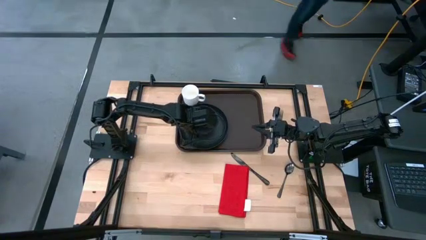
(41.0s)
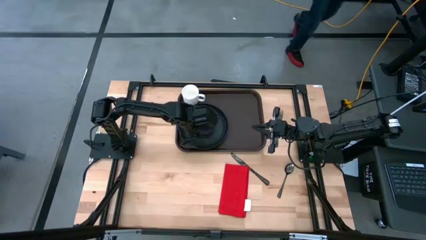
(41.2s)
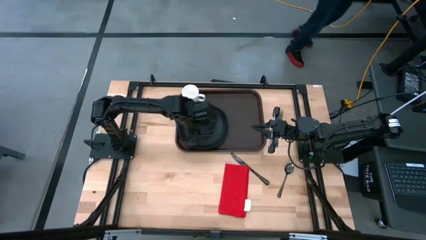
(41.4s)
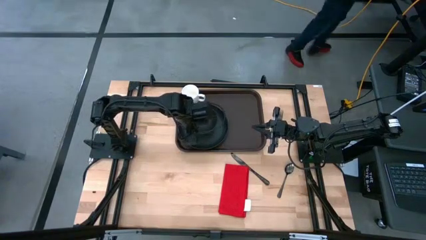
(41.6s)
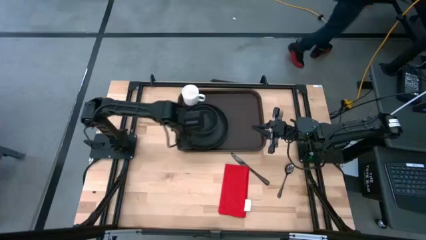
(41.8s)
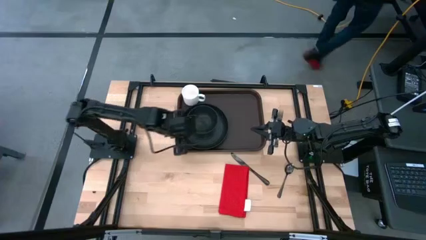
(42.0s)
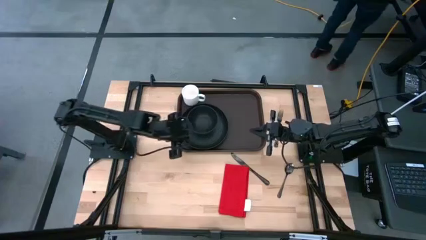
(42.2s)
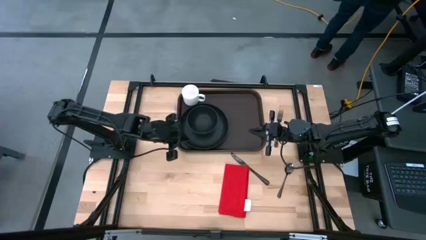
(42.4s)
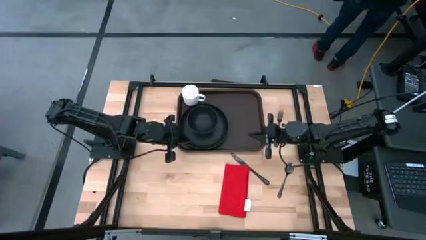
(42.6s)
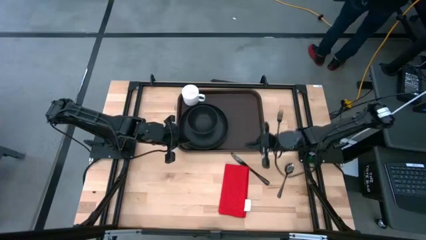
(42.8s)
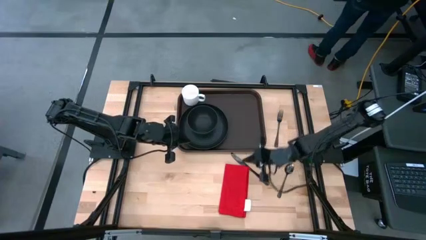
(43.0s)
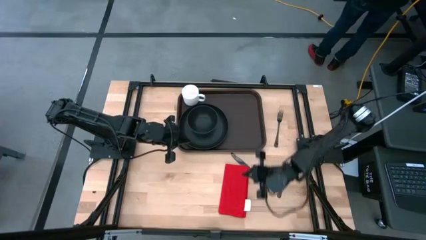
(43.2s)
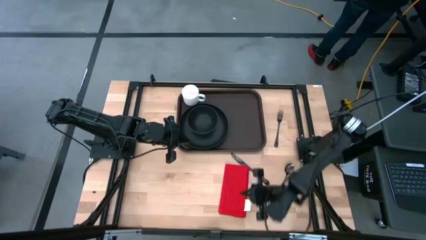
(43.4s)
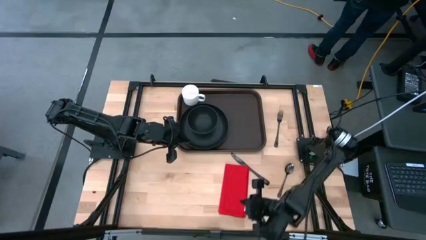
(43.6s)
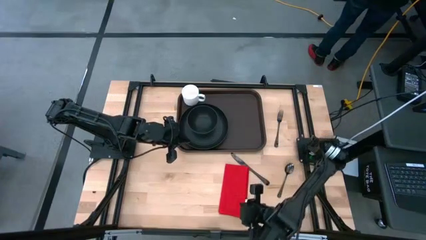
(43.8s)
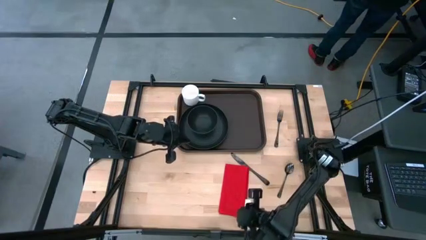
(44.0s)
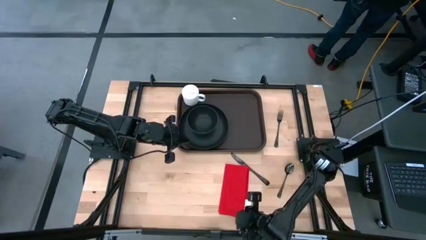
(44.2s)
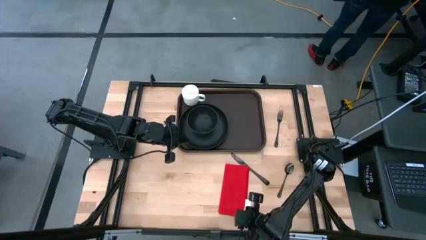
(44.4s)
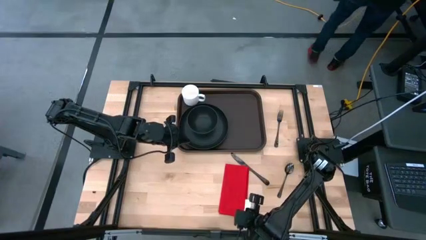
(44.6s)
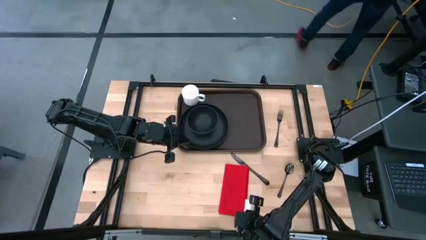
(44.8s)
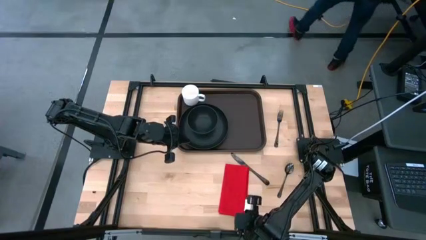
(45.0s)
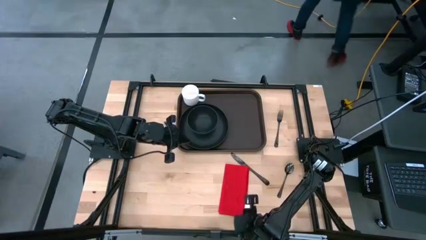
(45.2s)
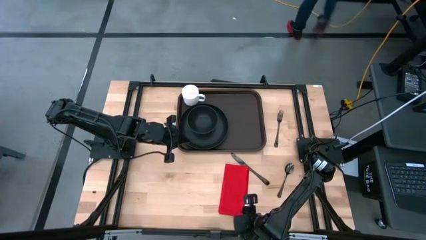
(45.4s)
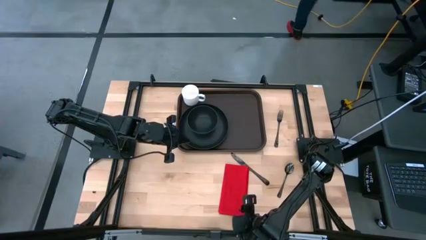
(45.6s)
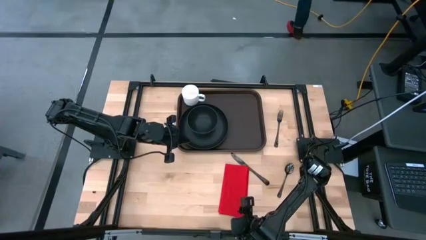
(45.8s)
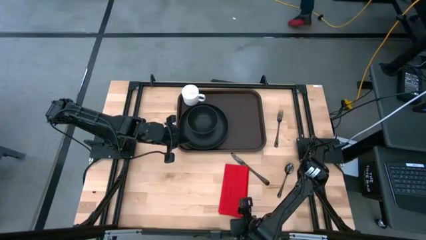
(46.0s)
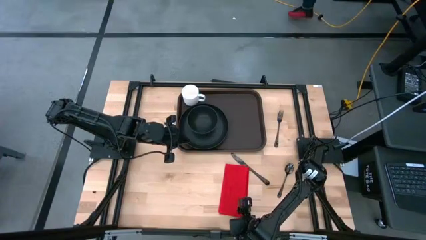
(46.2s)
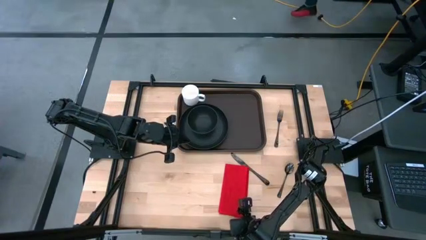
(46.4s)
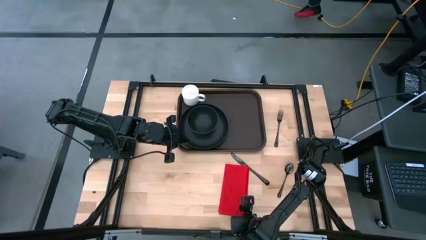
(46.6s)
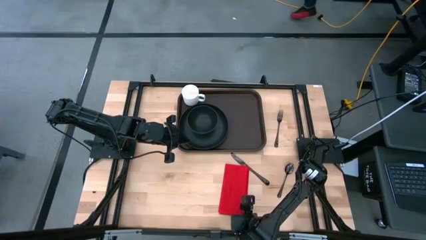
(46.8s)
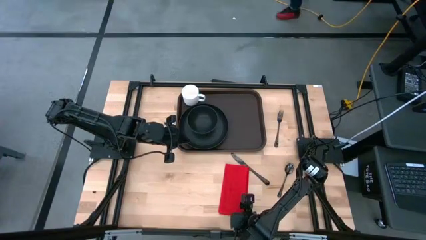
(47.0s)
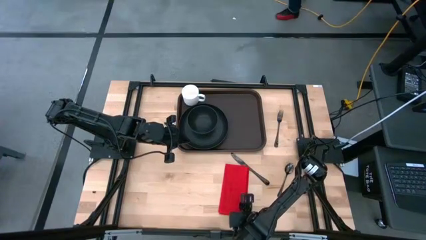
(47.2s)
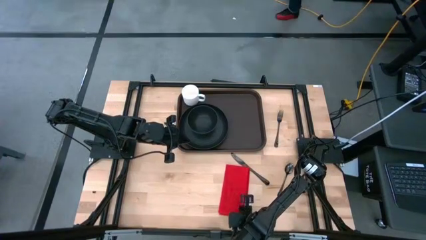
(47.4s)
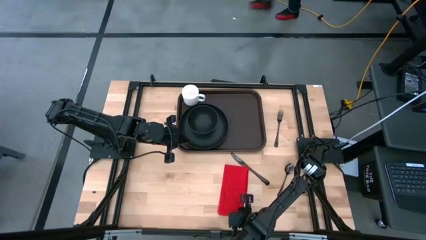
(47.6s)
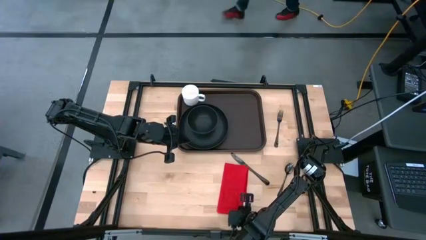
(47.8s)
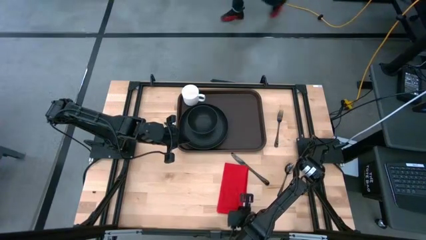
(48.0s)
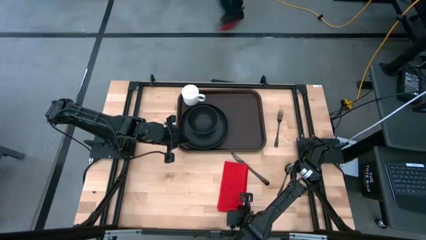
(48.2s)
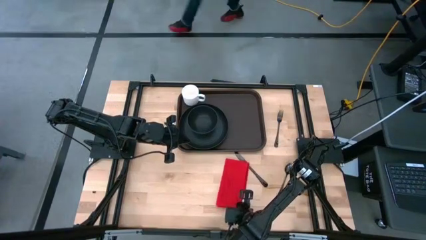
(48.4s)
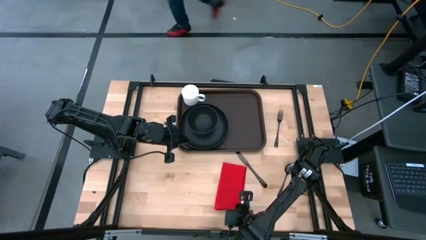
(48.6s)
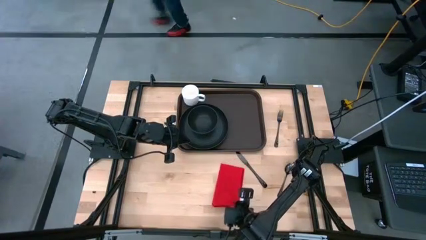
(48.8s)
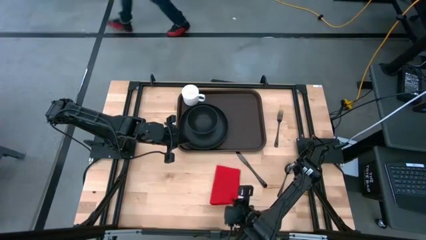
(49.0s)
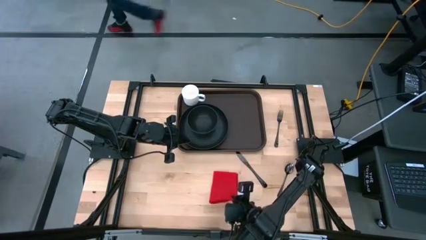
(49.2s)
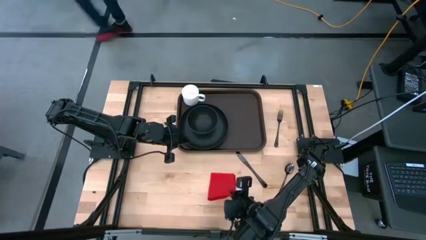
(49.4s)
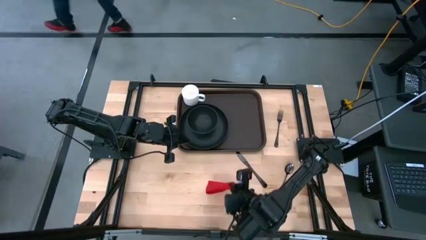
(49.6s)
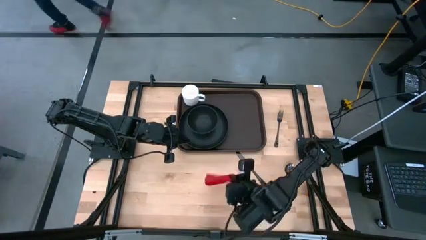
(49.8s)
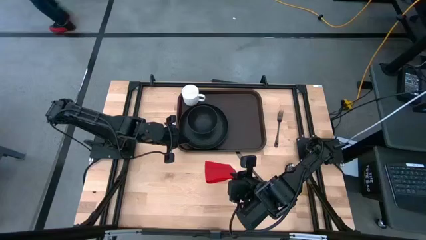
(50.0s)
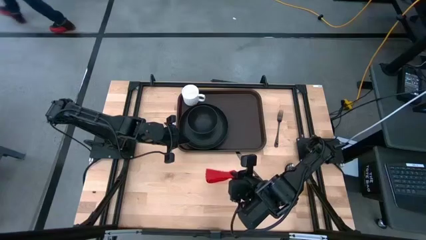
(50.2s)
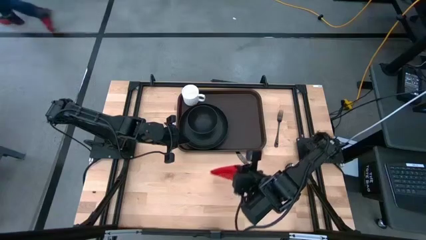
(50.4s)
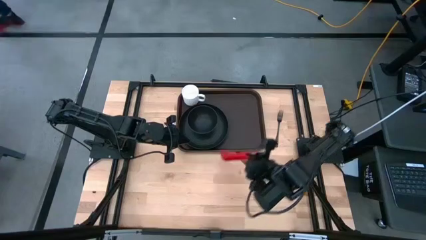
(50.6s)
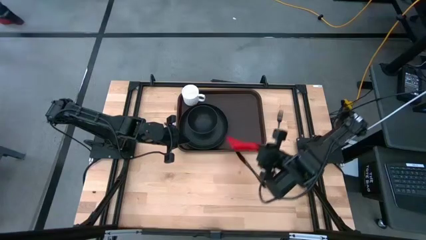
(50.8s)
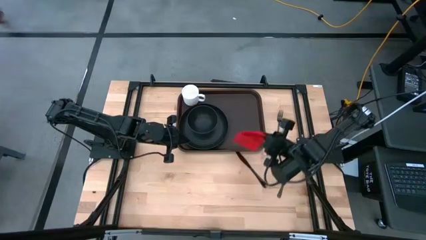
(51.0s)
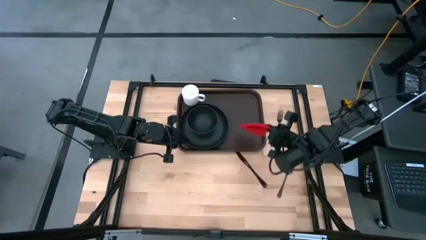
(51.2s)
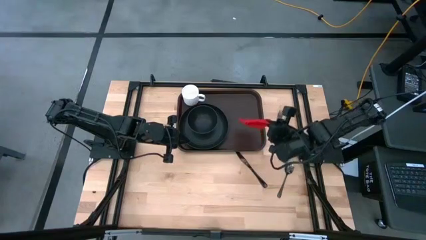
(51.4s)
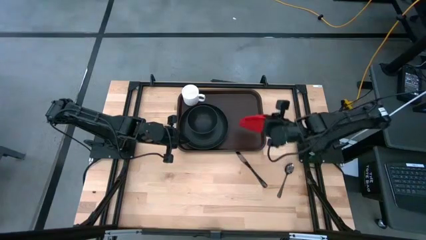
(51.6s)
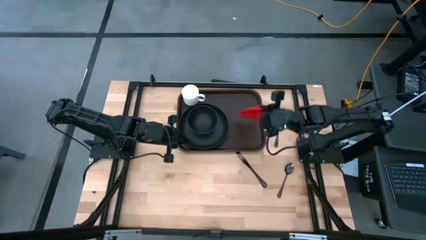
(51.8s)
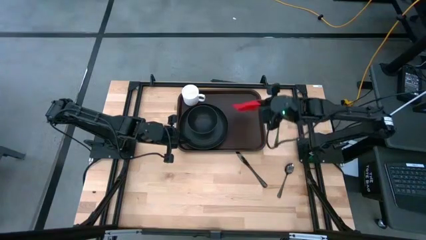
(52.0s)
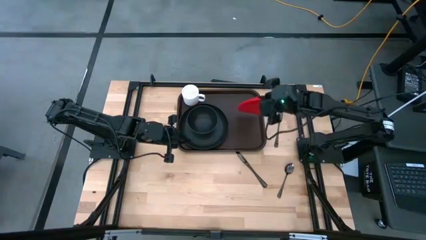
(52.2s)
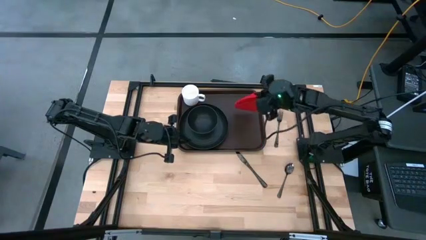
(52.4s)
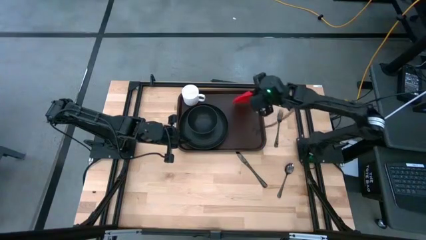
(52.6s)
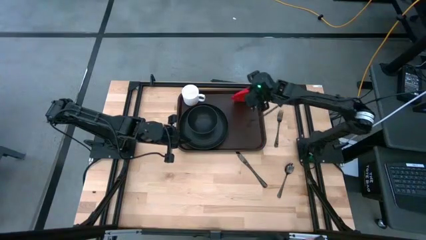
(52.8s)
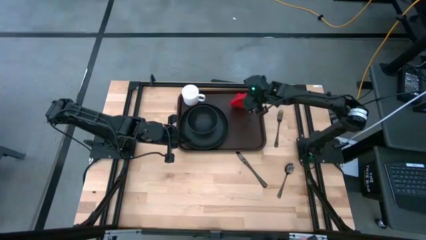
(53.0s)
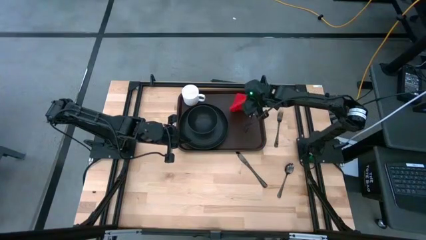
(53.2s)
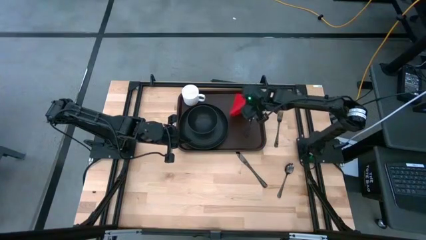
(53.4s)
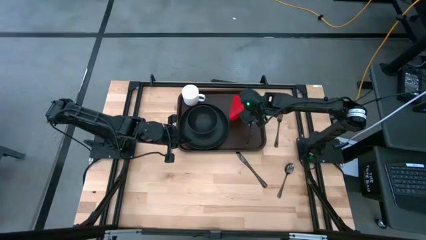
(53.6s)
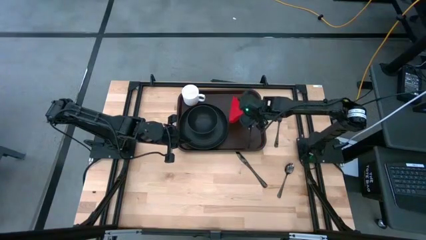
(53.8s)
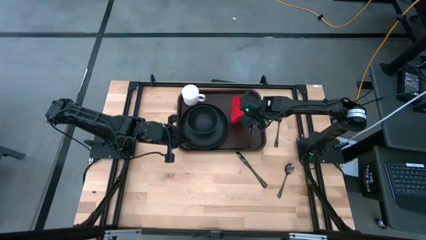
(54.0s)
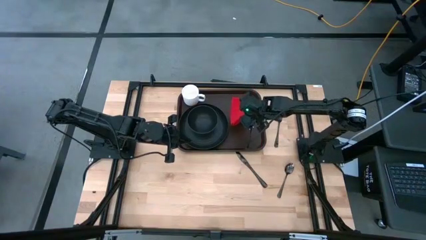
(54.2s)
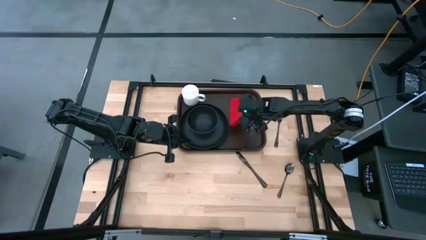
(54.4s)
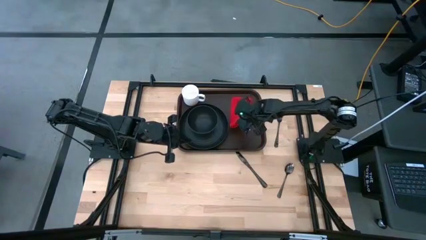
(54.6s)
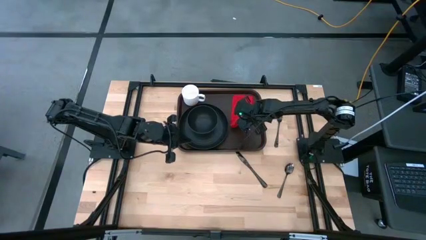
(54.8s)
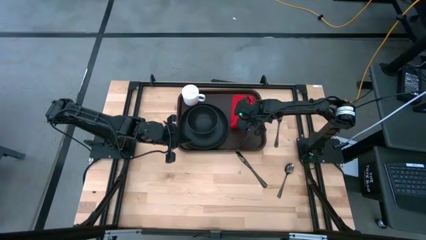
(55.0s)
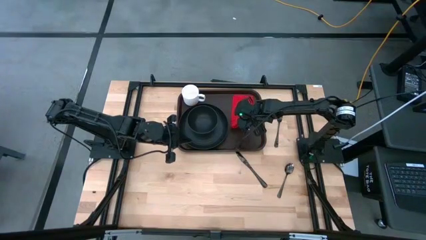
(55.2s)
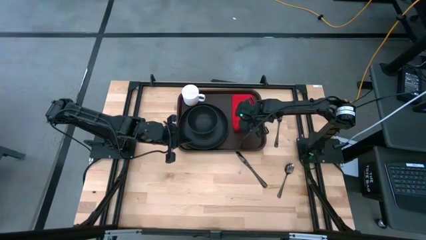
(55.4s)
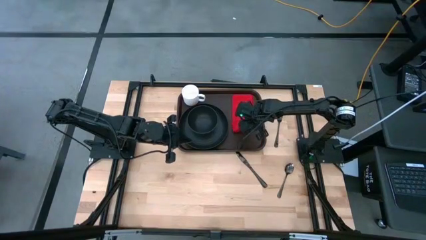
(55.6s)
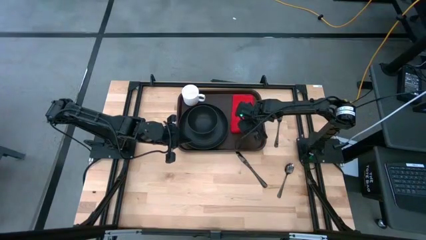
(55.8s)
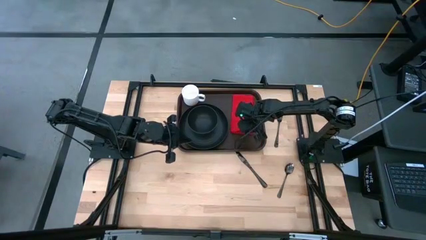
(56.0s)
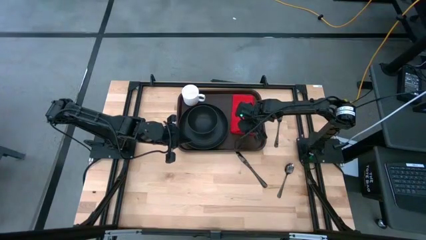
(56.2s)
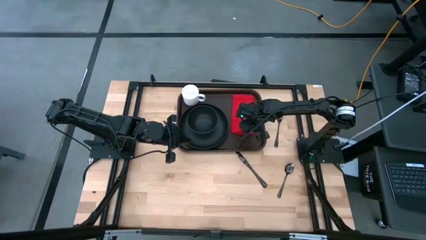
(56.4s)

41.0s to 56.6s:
Task: Set up tray
Put the red napkin on the brown serving tray to the top right of the black plate
